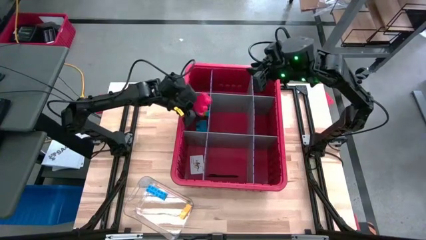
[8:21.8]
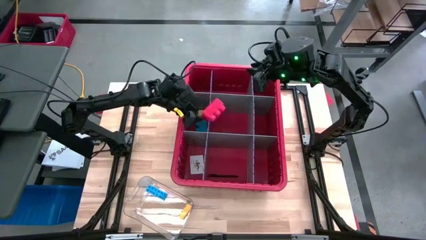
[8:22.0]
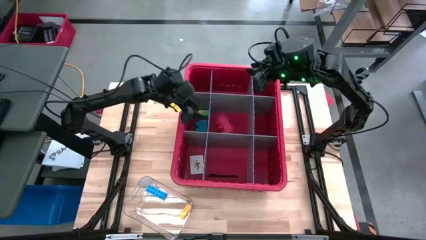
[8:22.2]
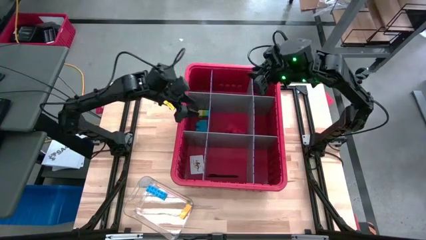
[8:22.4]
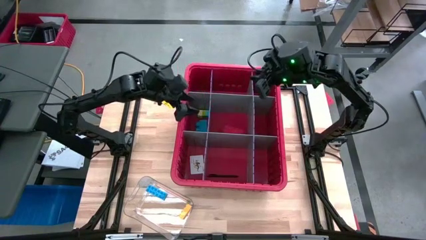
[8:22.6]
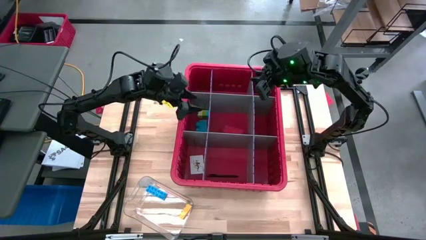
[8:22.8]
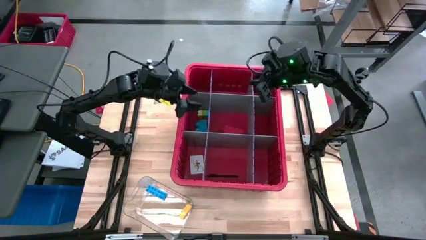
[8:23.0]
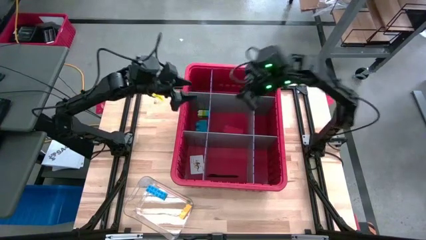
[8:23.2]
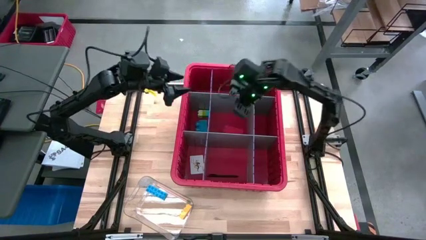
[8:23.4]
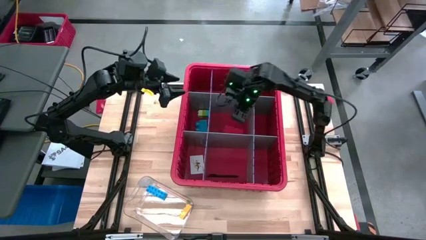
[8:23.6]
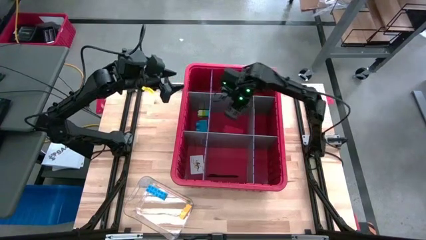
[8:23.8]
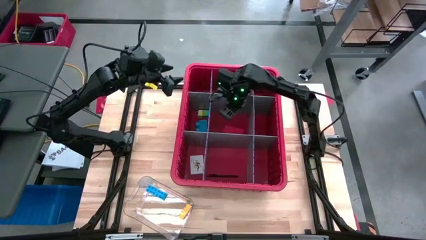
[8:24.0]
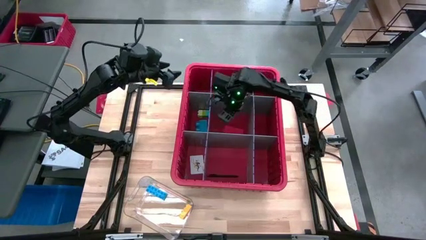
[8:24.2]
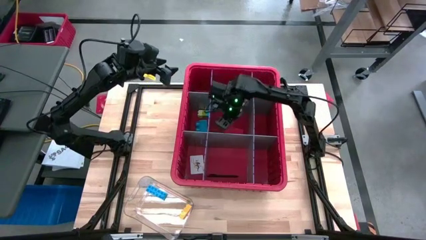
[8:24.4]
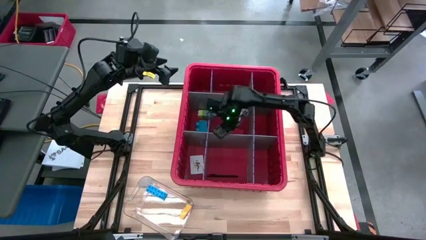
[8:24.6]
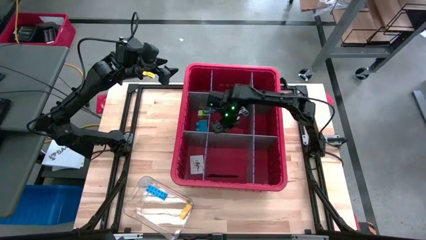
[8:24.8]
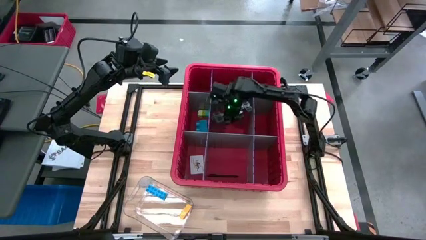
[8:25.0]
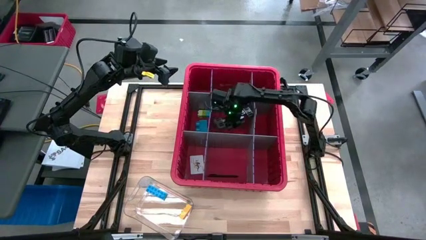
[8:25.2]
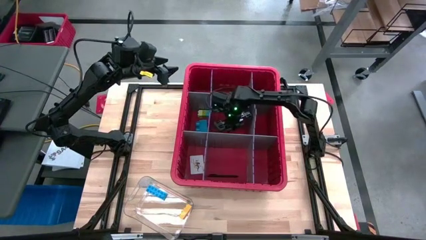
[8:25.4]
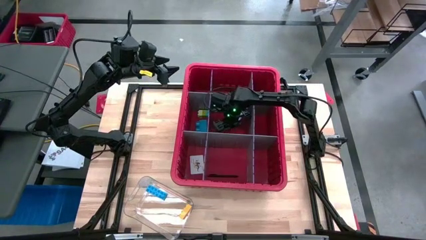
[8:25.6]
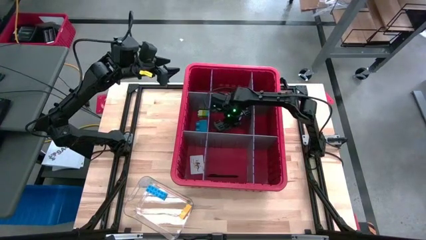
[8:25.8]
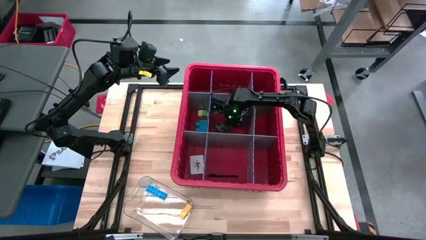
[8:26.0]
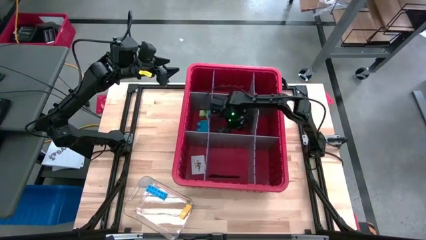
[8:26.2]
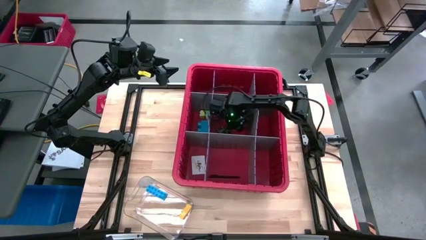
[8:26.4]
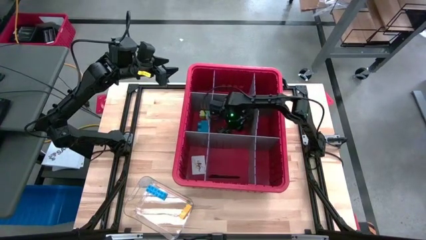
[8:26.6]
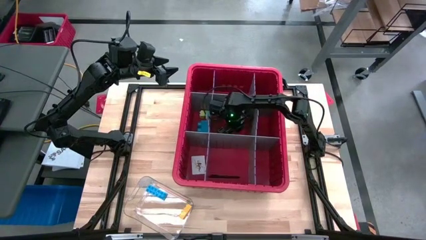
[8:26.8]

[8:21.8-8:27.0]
Task: Sort blocks
Move the orange block

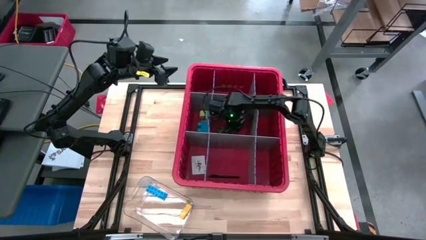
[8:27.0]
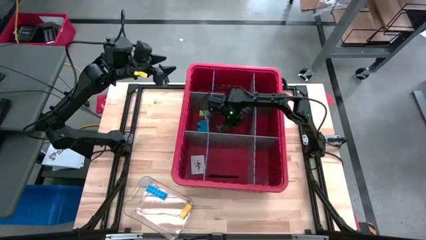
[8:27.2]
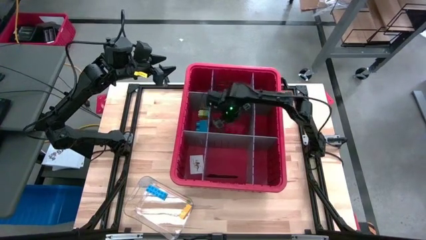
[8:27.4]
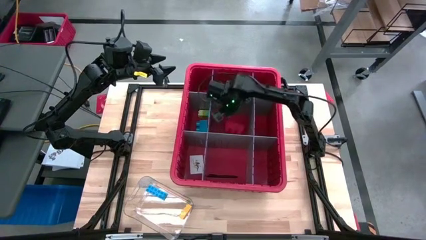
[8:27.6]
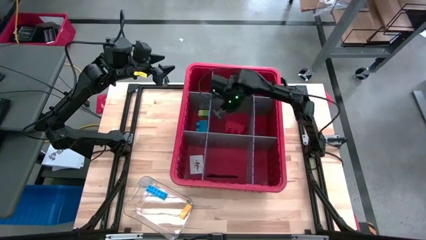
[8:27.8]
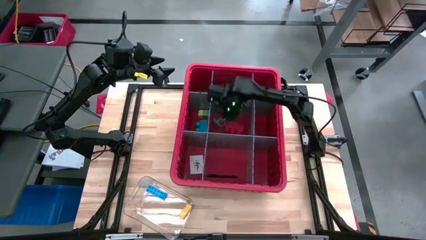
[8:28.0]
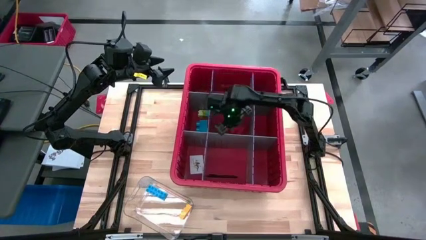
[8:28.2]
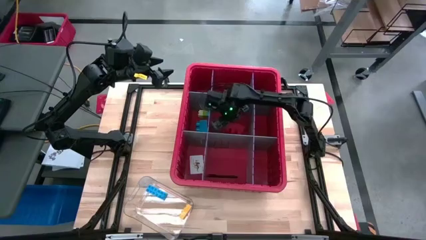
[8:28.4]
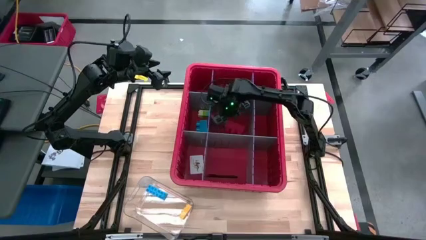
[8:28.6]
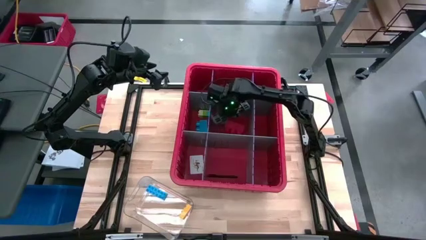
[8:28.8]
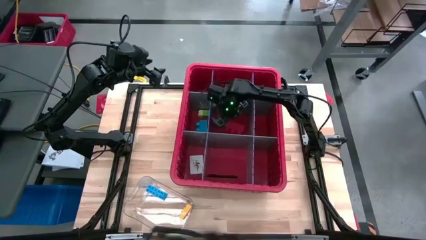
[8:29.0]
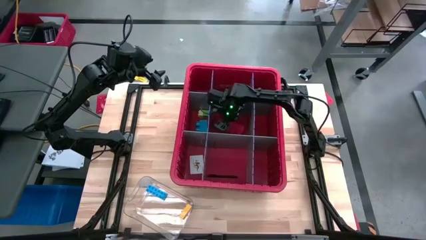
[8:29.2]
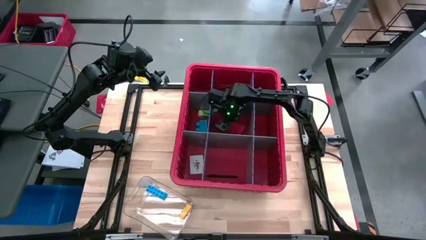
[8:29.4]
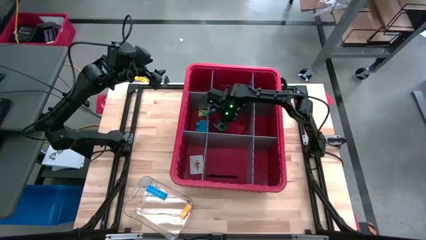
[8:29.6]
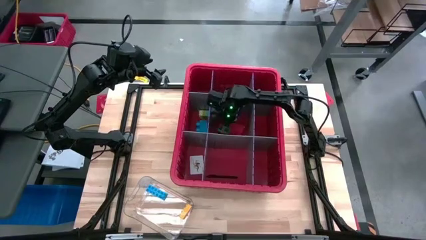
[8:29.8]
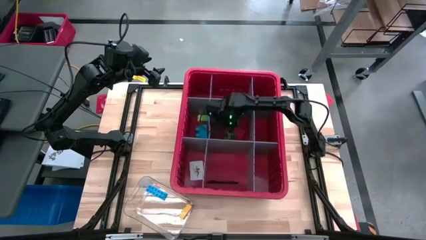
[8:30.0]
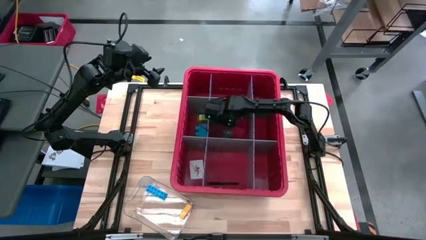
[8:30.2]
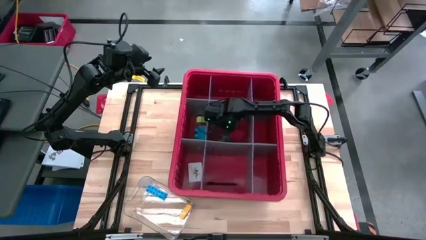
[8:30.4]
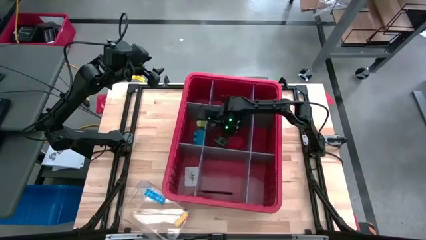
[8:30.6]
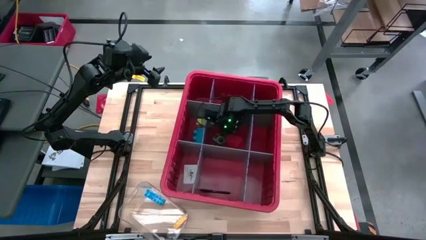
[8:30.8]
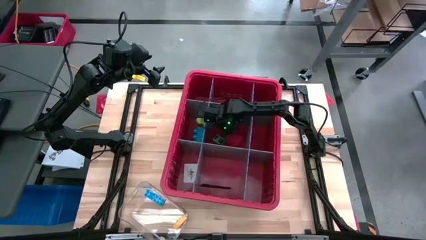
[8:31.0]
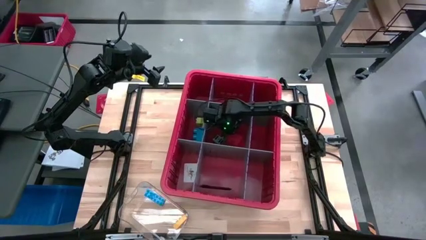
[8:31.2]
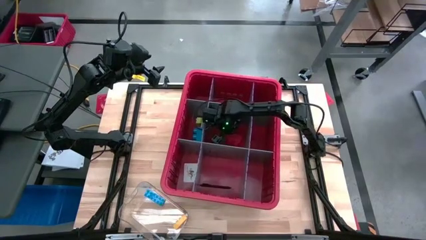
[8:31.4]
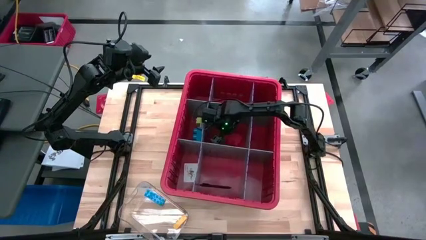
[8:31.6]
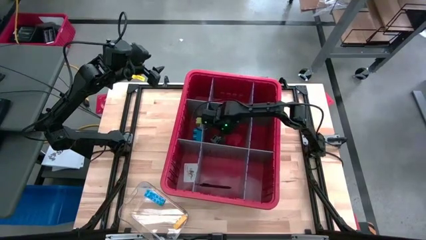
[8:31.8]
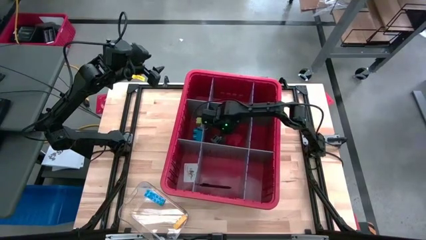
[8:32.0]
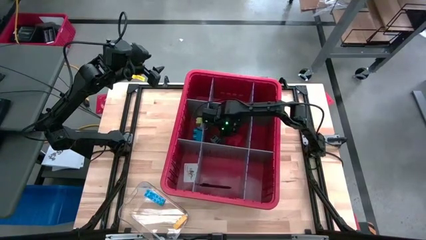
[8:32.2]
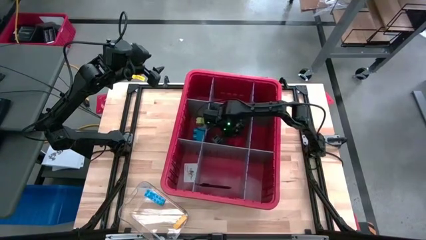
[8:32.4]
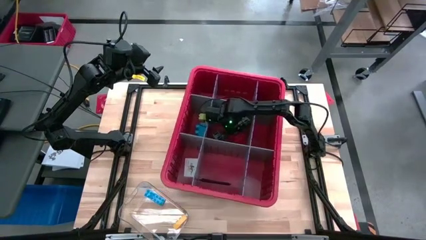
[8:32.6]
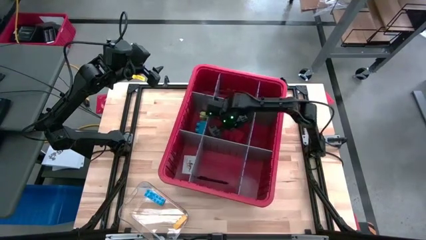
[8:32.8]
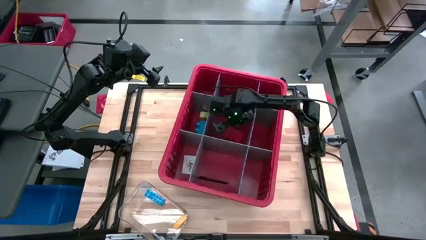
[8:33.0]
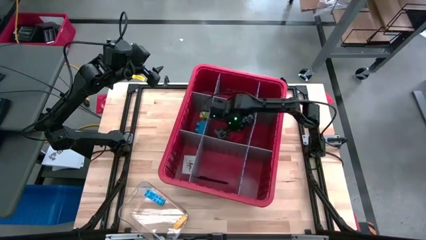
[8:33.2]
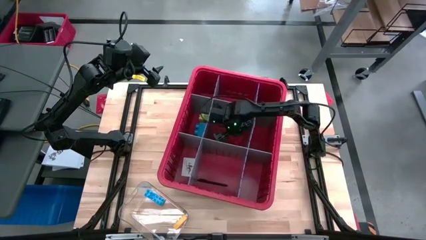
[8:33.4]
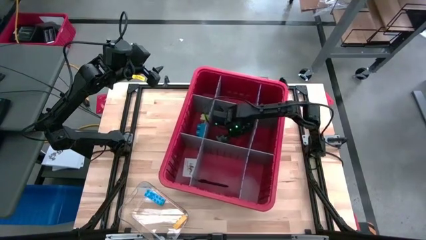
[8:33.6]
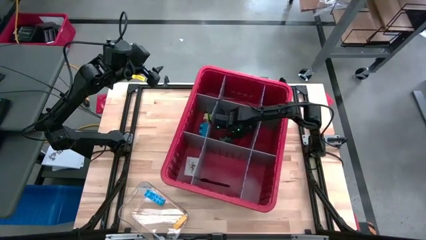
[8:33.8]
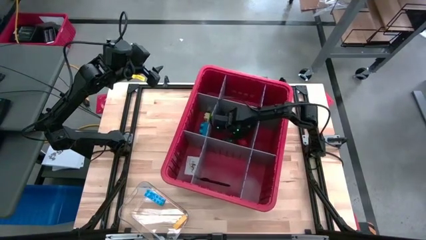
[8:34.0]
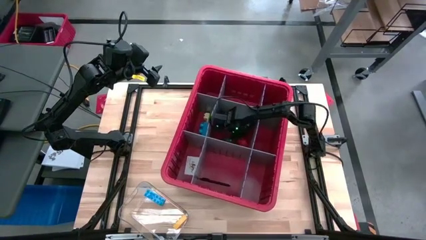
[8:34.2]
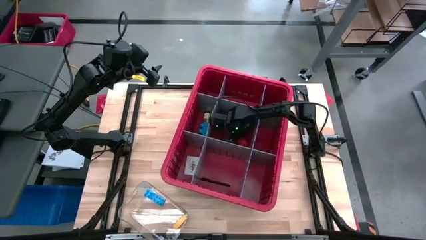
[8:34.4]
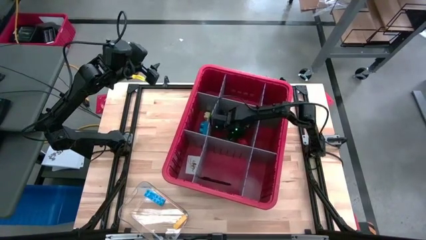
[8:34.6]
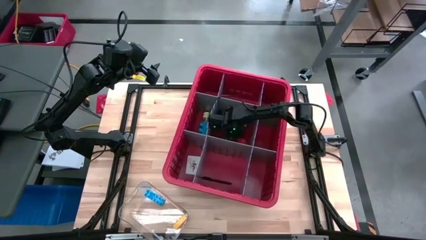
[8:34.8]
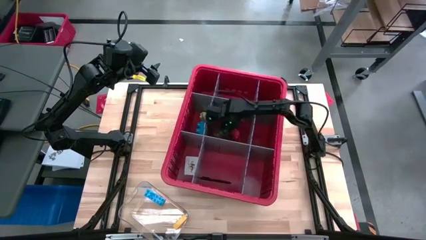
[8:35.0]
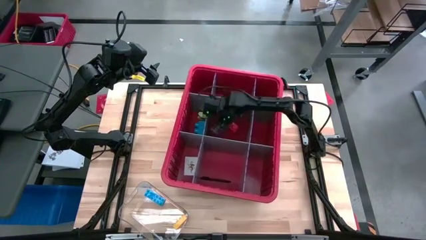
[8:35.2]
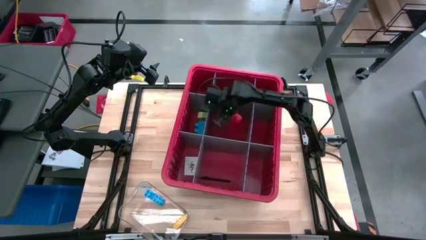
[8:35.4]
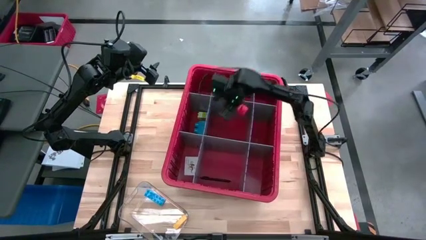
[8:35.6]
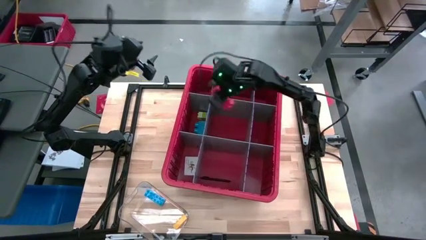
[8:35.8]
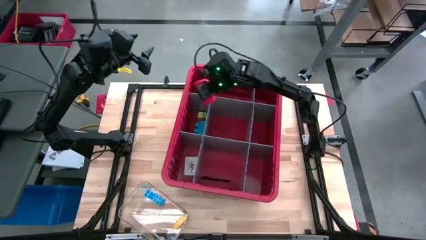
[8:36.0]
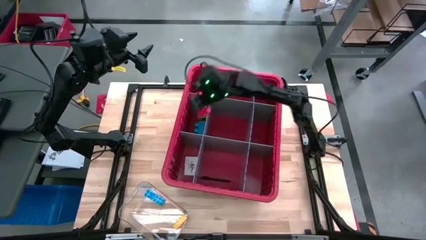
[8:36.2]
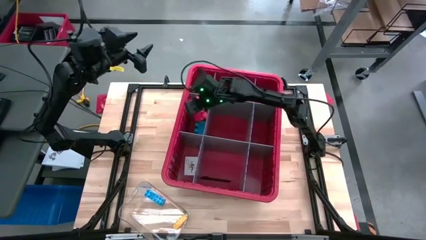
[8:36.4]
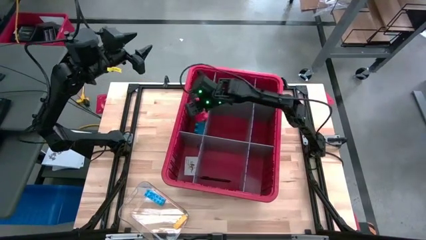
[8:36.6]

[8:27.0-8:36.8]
Move the orange block
